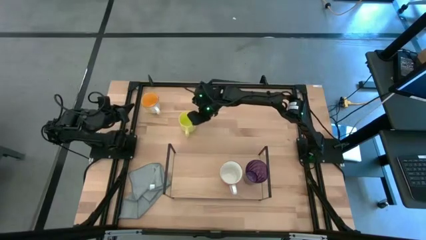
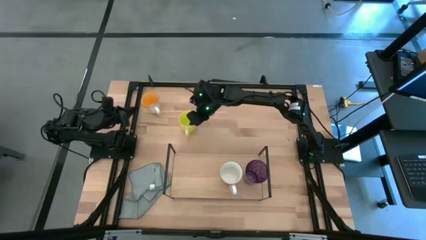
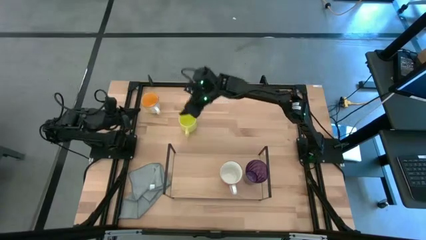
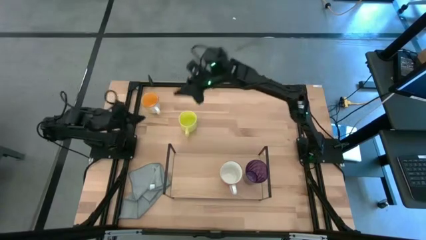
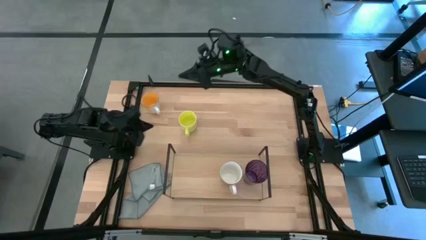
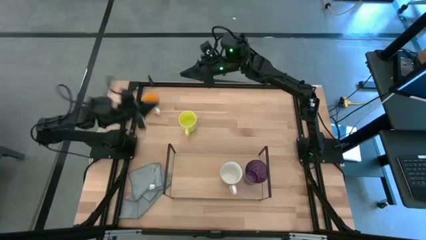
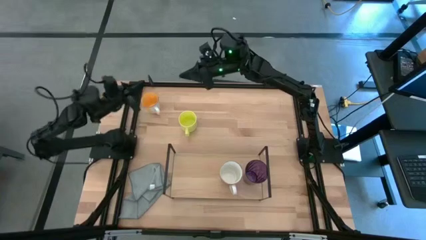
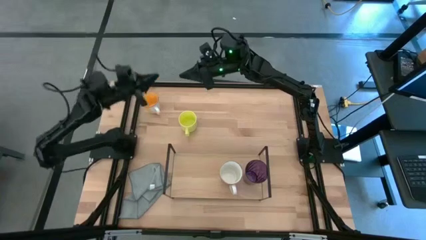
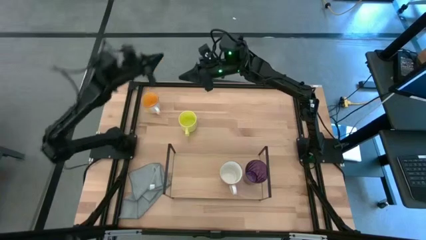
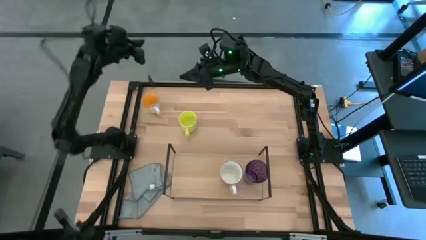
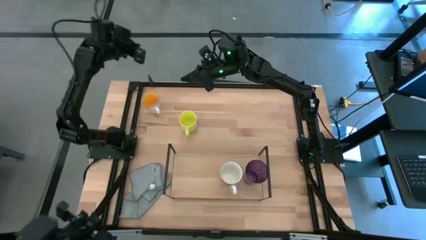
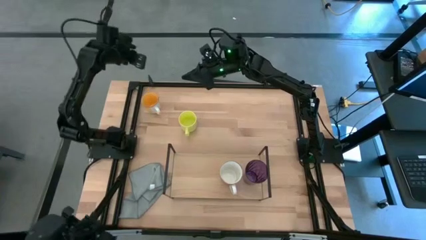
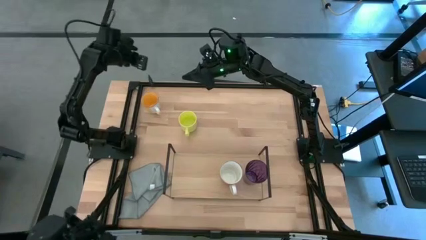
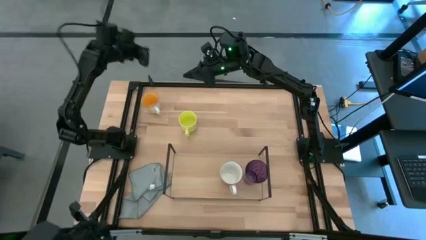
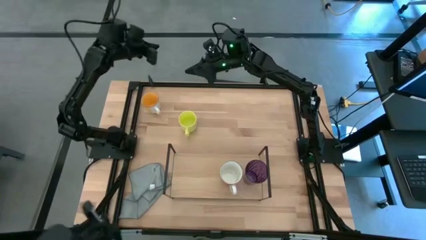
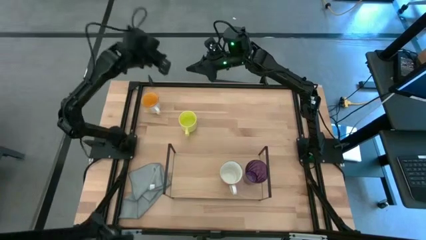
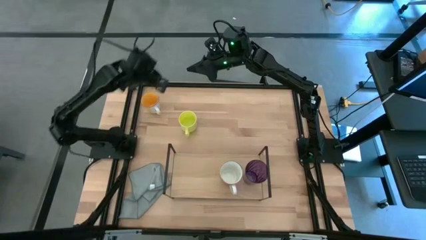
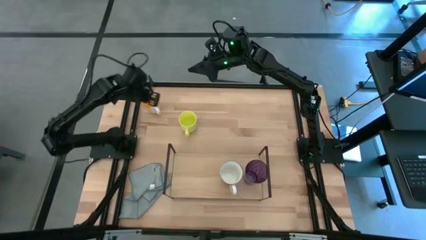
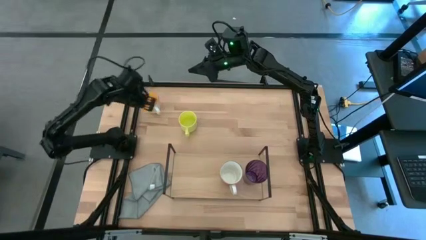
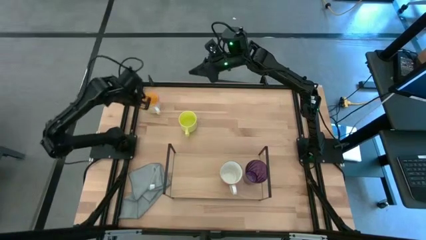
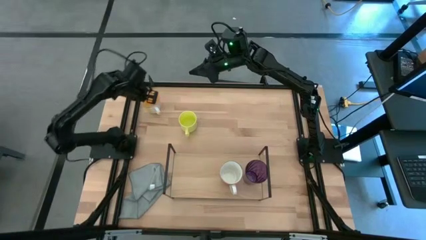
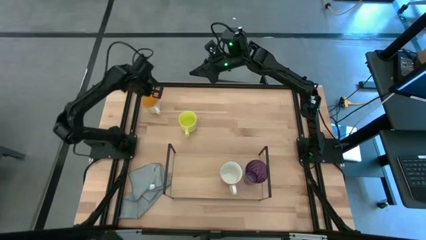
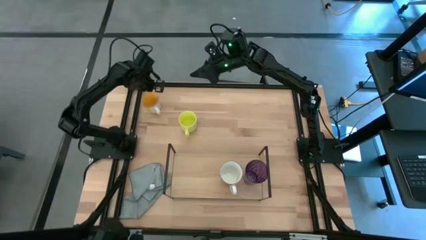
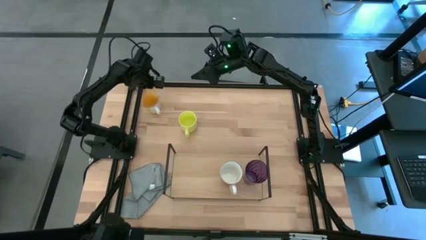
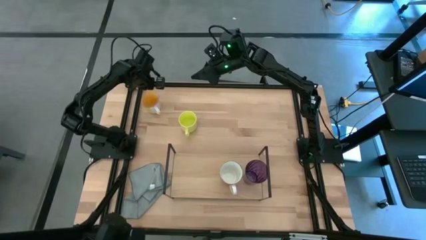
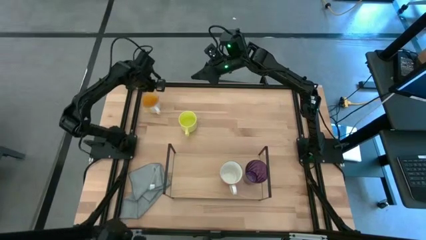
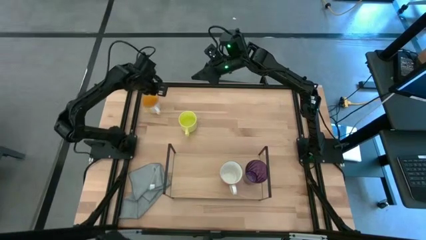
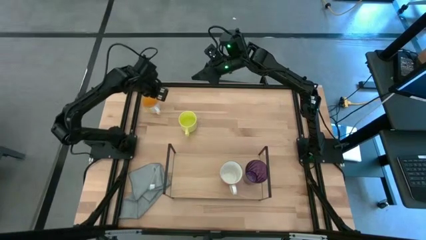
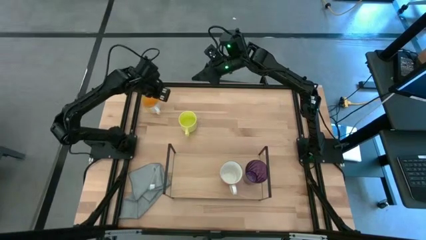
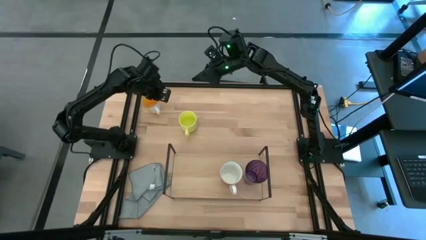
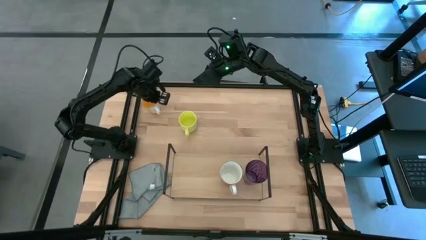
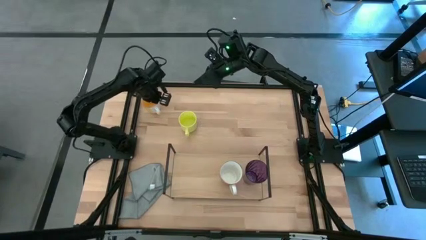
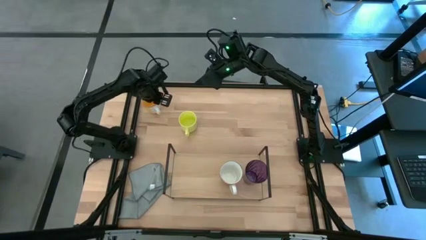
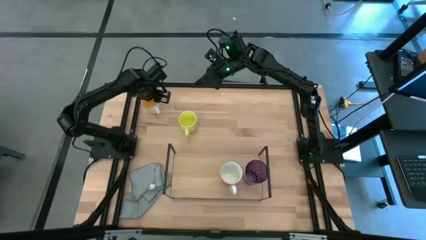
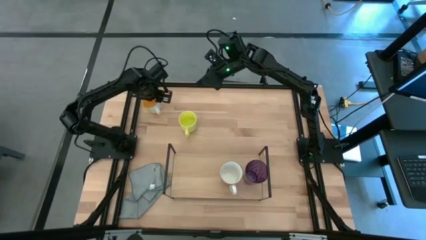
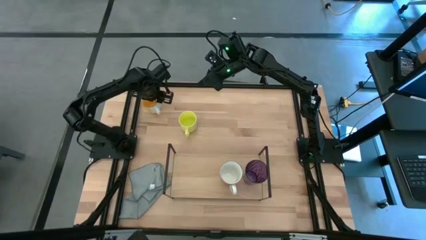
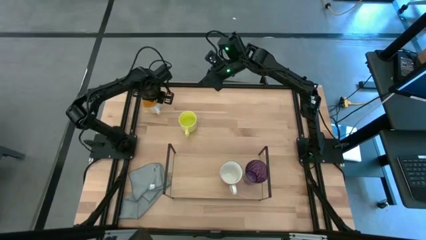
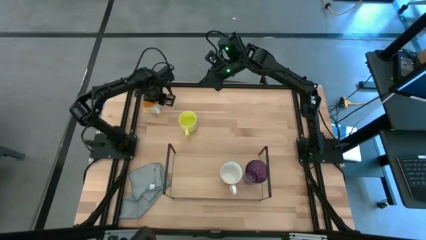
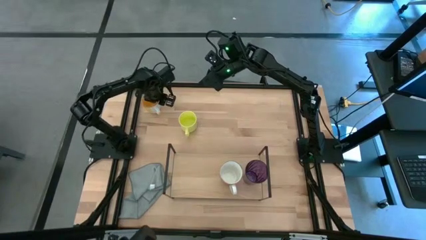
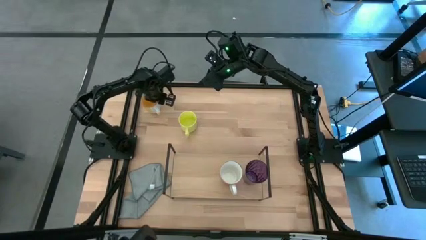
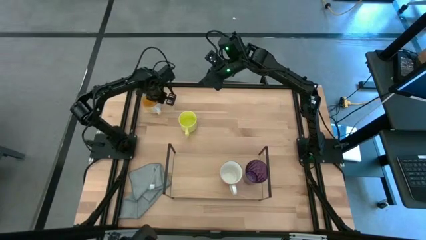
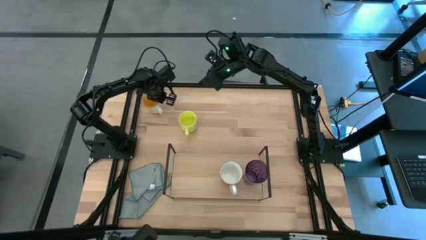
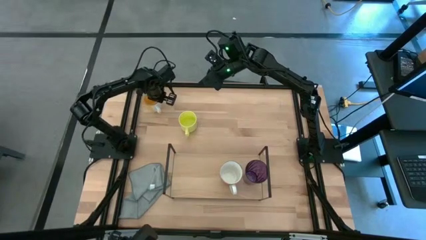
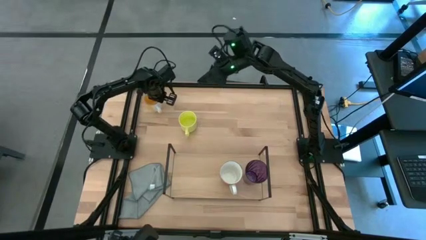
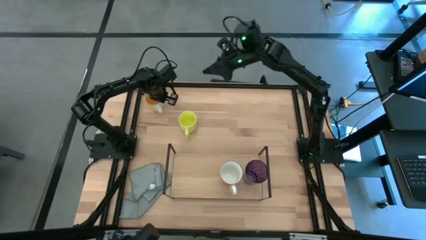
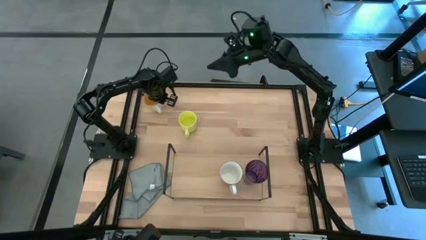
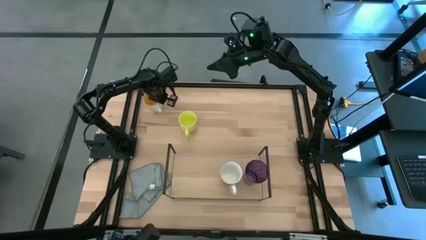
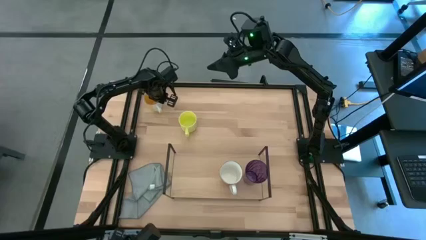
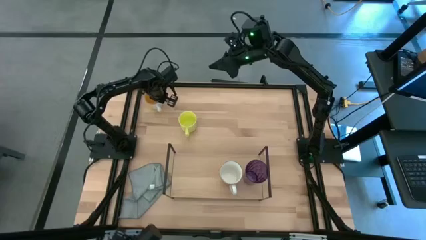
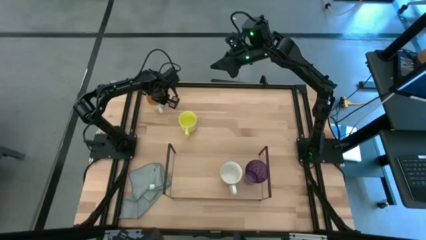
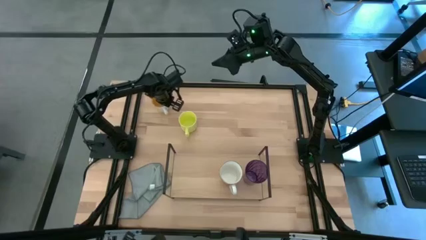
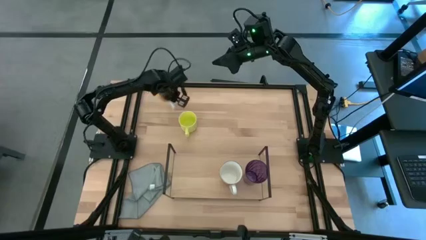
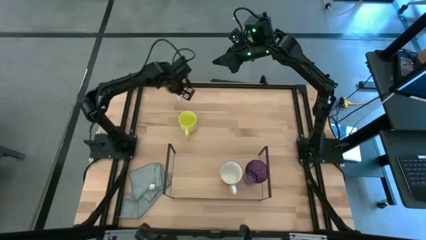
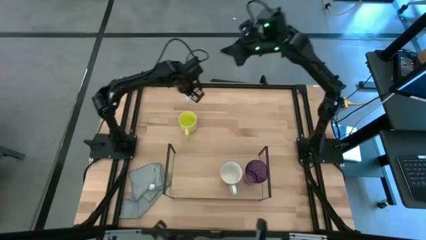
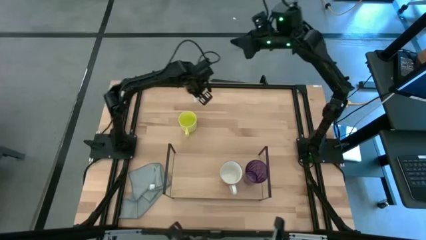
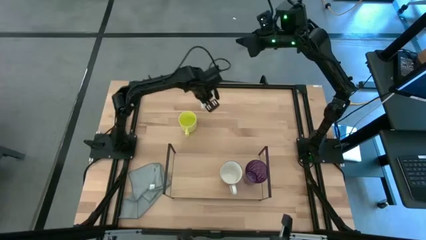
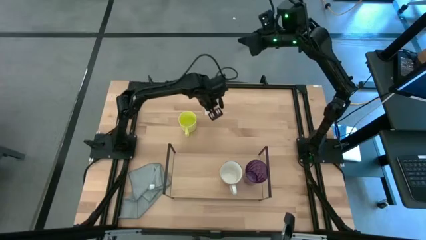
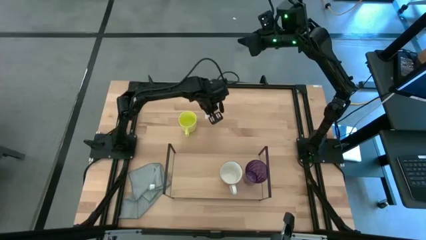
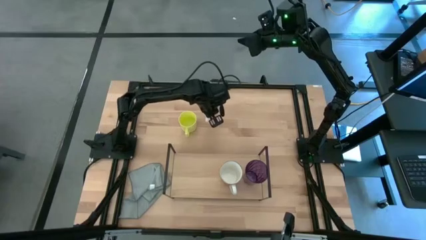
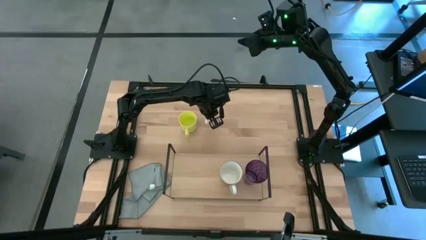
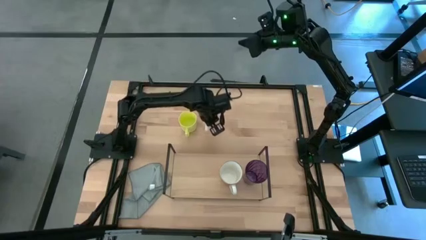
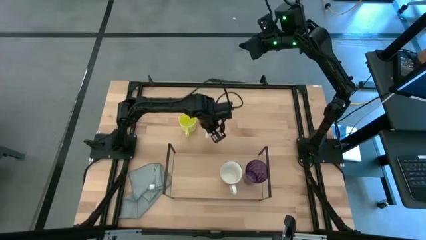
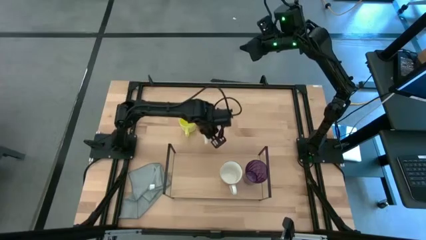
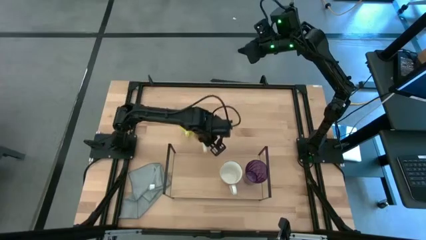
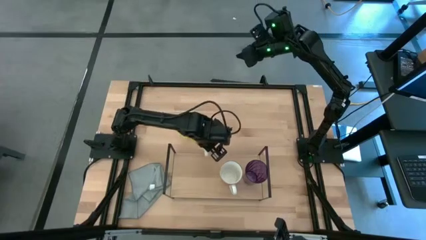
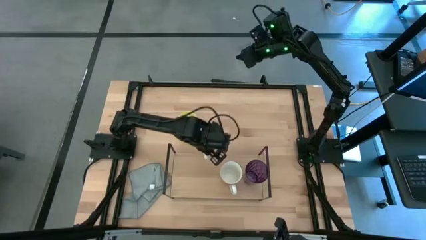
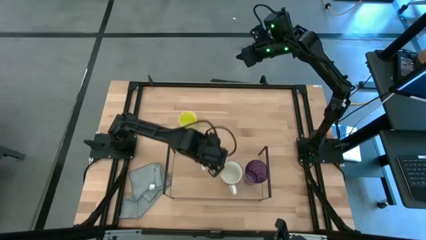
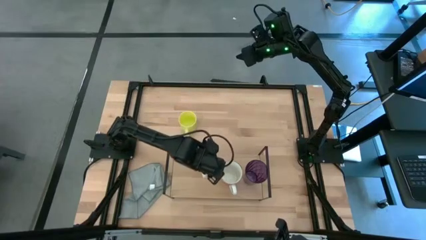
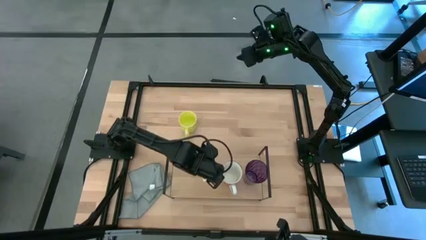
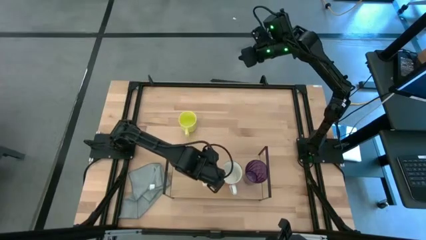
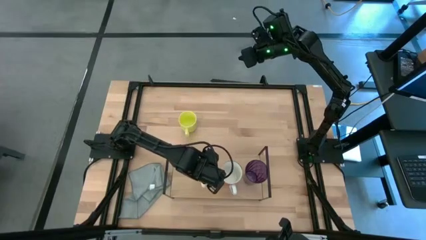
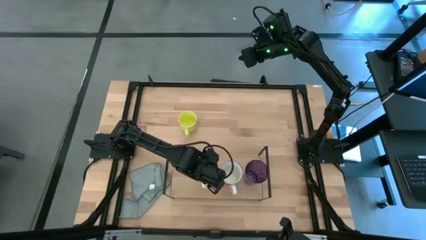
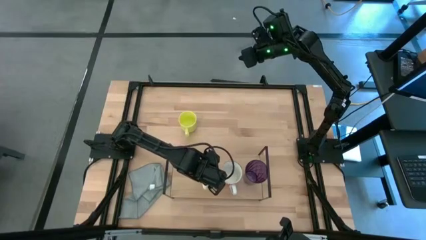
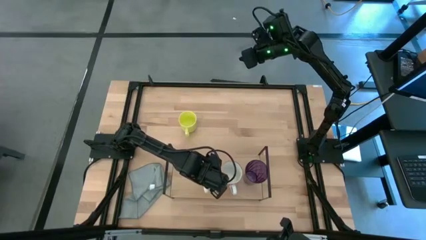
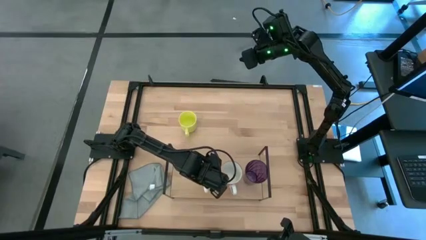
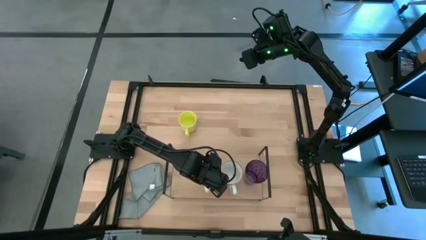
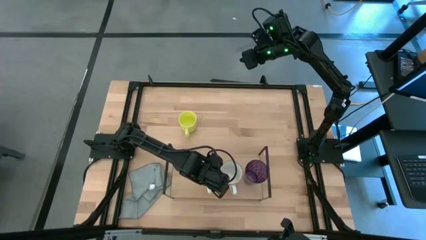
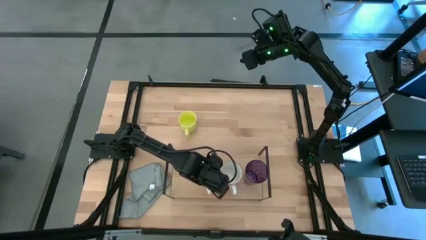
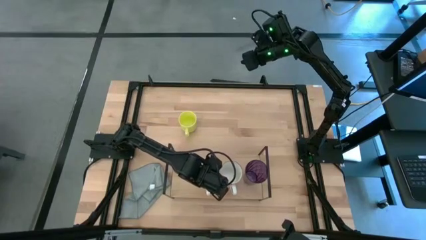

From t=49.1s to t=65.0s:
Task: Stack small to large cups/mugs on shelf
Put the orange mug on the shelf
